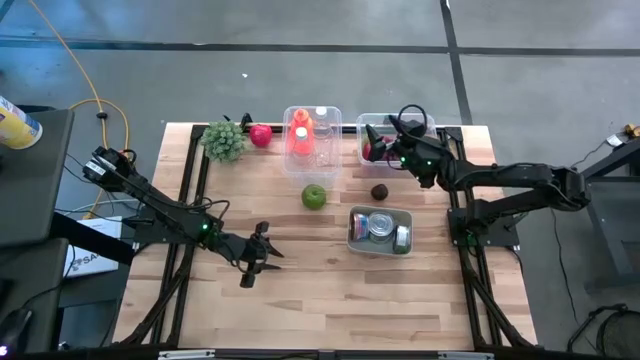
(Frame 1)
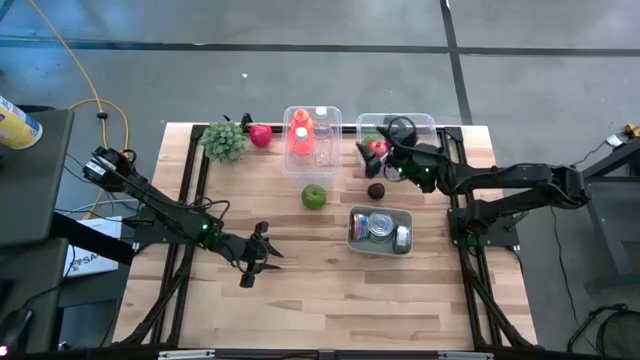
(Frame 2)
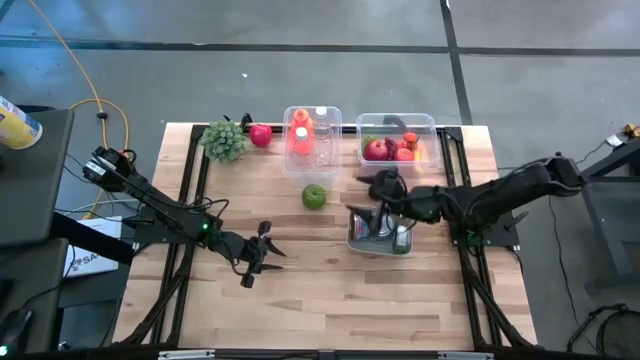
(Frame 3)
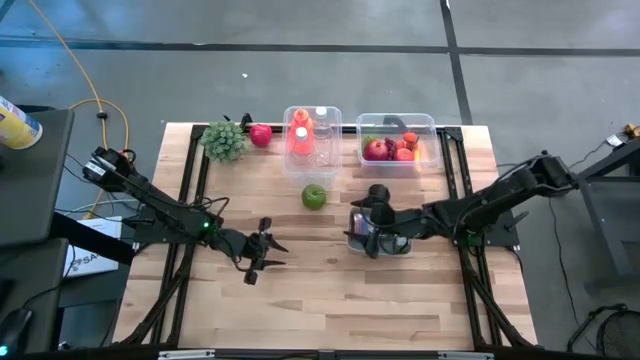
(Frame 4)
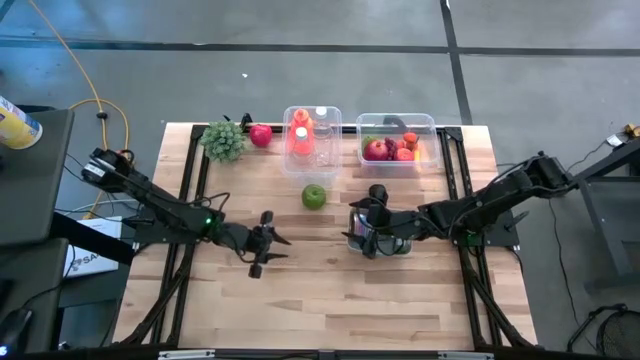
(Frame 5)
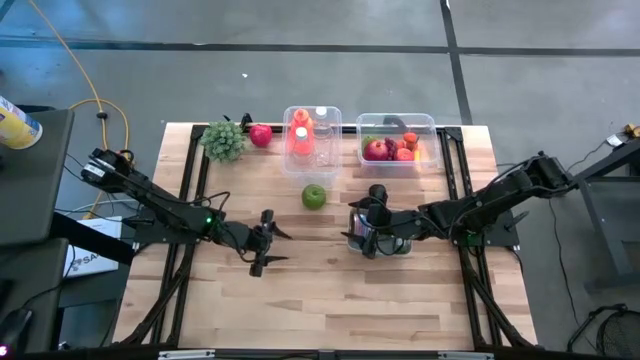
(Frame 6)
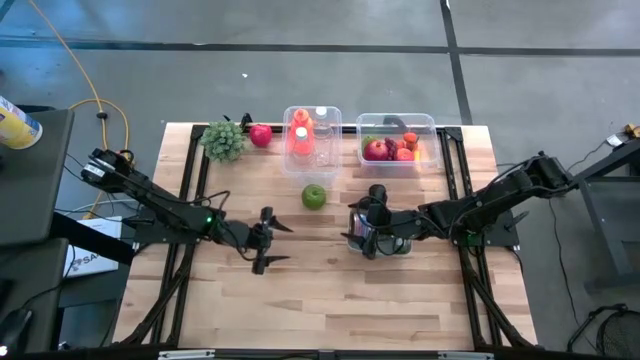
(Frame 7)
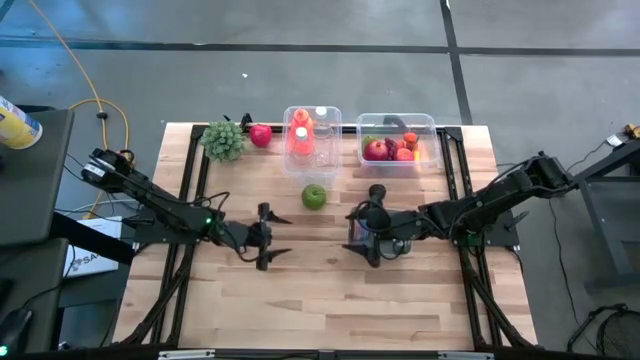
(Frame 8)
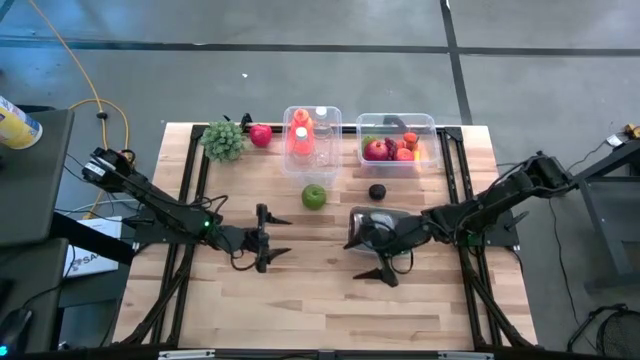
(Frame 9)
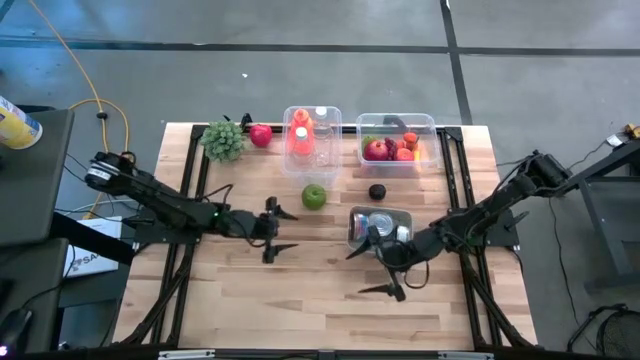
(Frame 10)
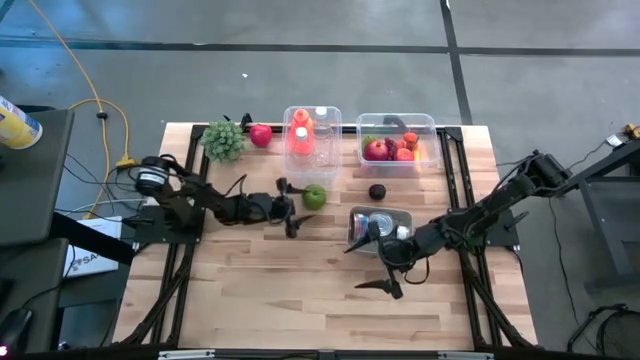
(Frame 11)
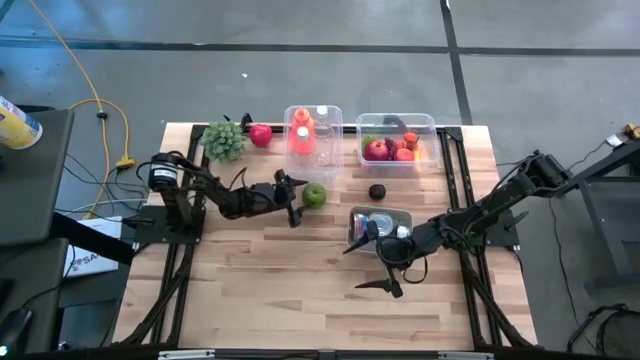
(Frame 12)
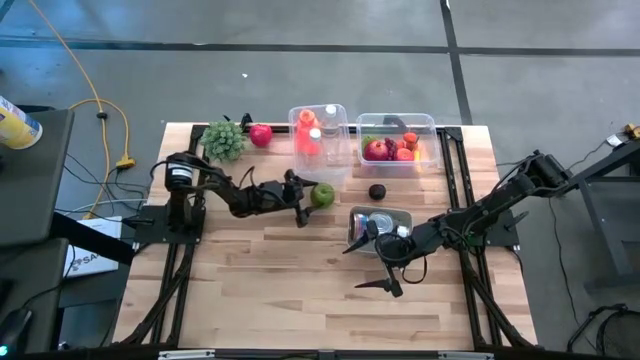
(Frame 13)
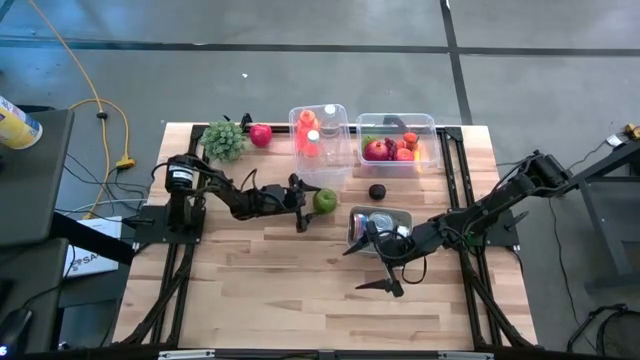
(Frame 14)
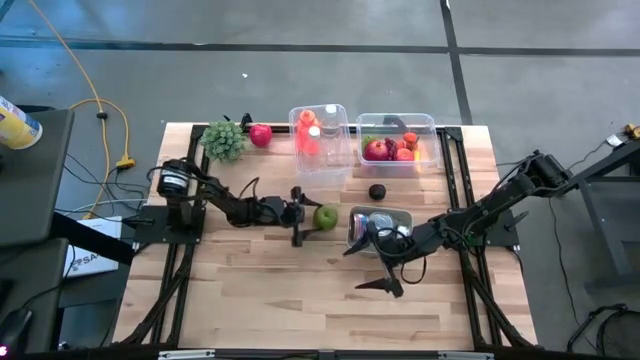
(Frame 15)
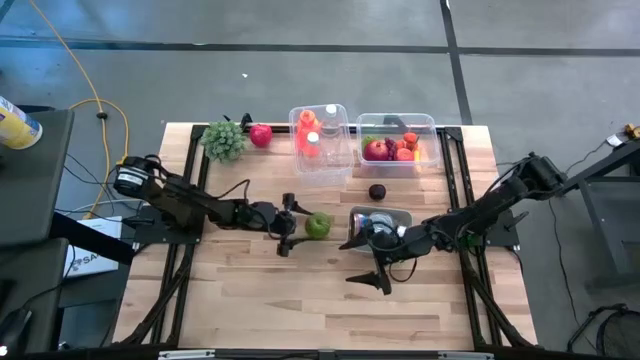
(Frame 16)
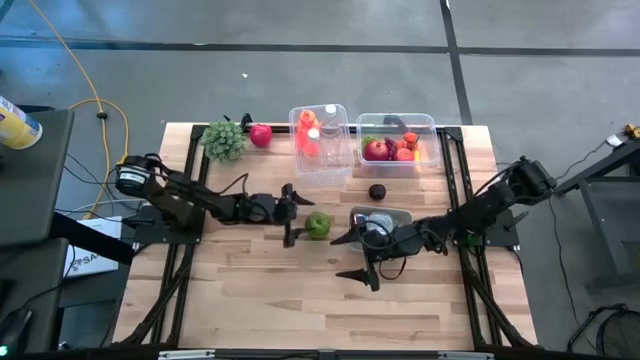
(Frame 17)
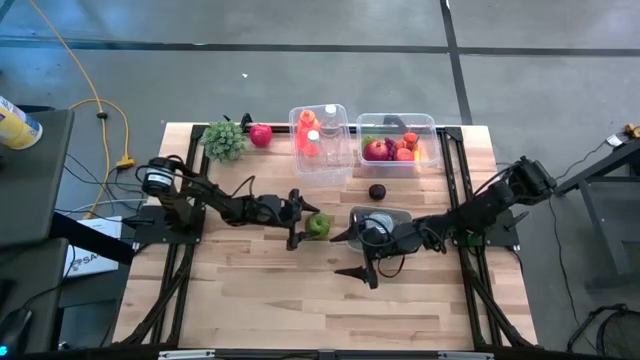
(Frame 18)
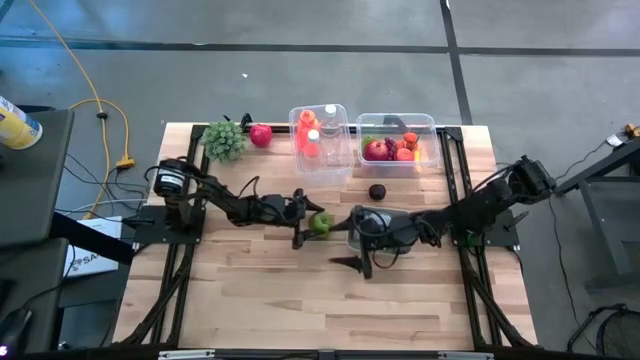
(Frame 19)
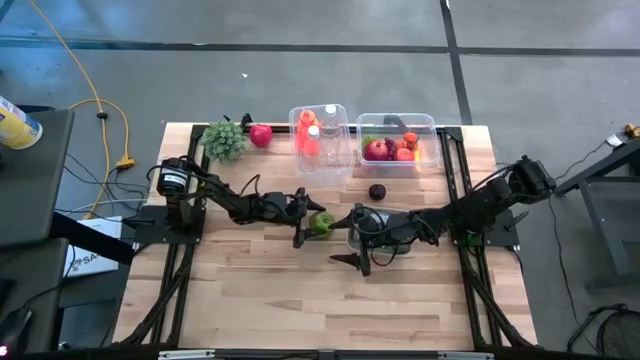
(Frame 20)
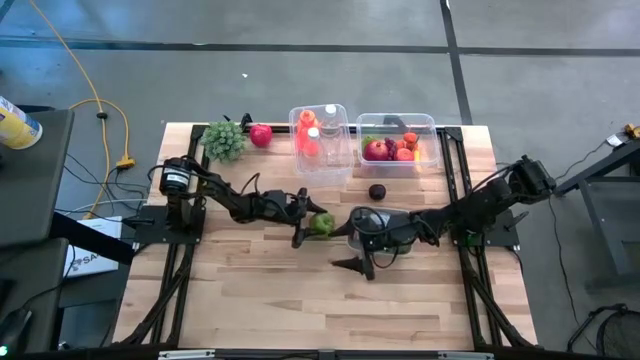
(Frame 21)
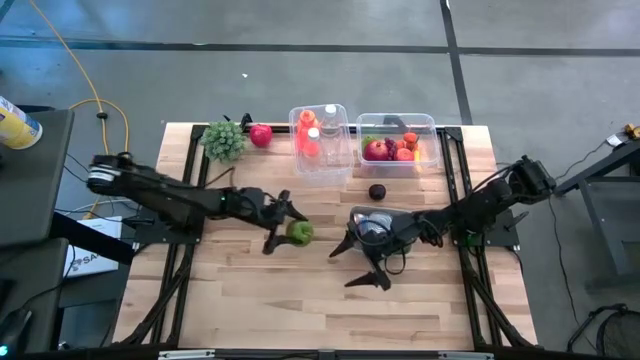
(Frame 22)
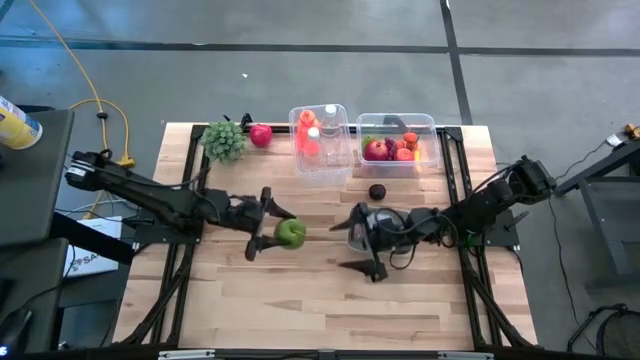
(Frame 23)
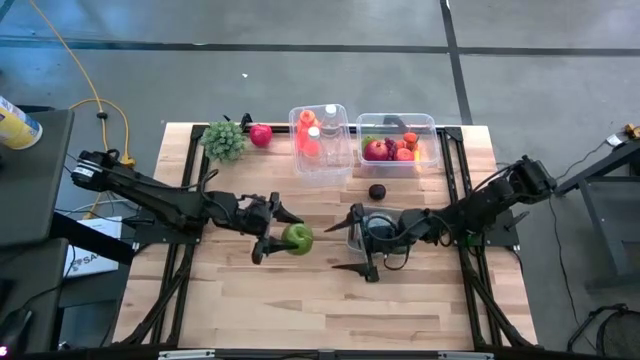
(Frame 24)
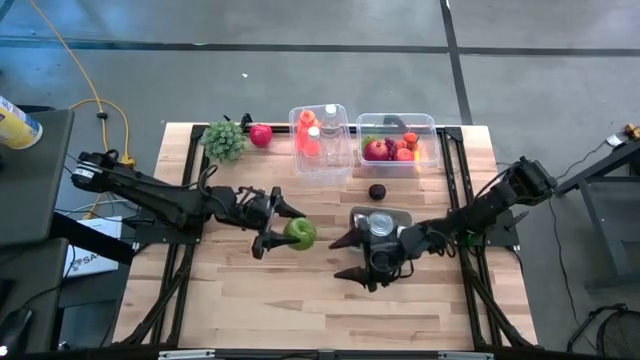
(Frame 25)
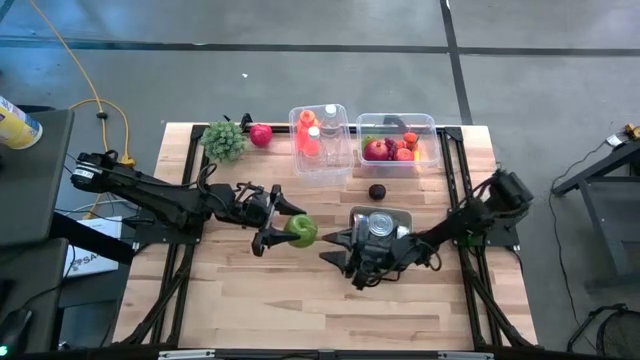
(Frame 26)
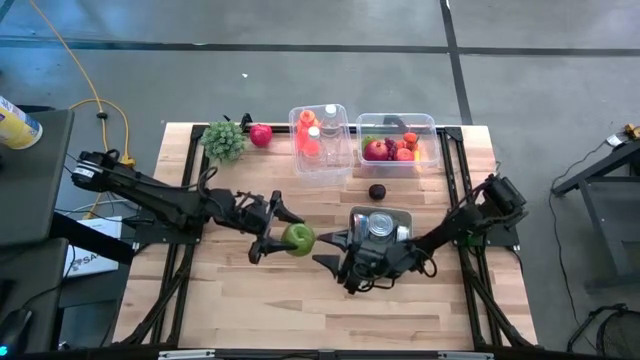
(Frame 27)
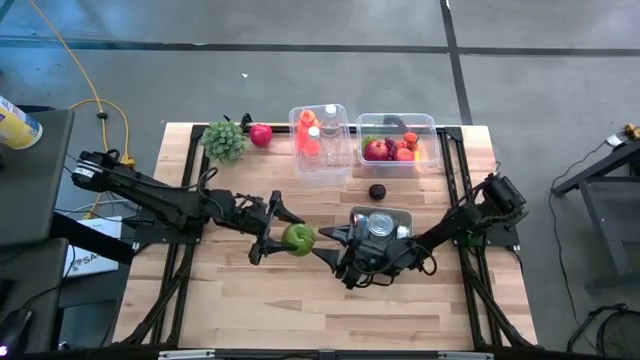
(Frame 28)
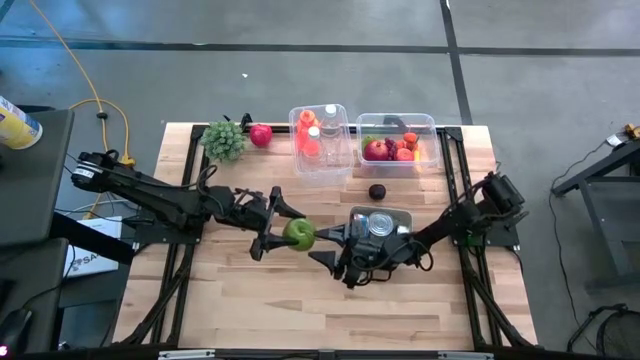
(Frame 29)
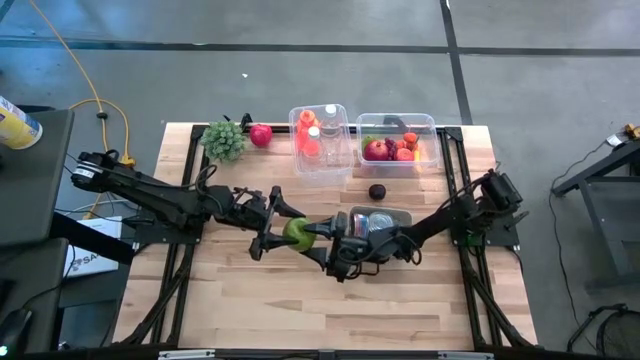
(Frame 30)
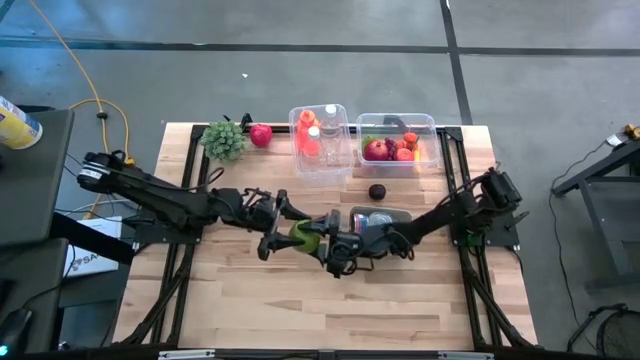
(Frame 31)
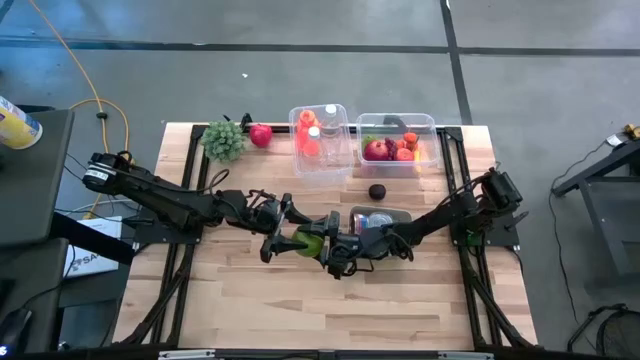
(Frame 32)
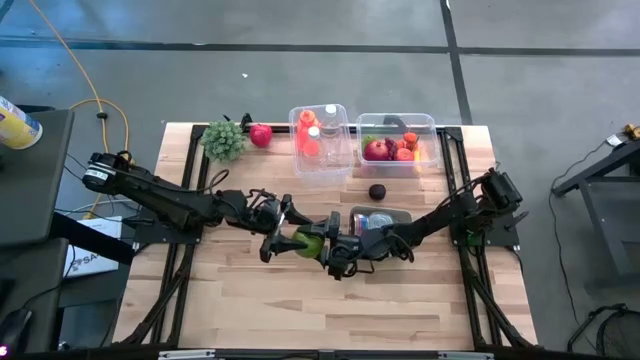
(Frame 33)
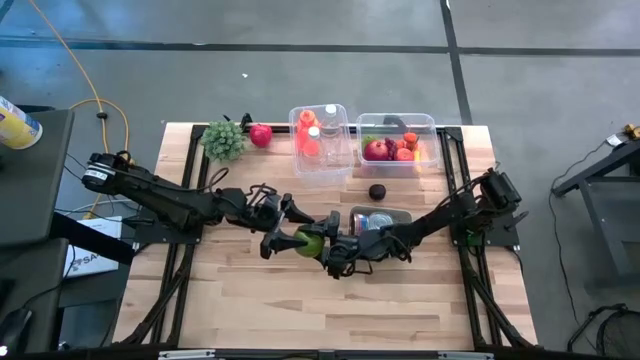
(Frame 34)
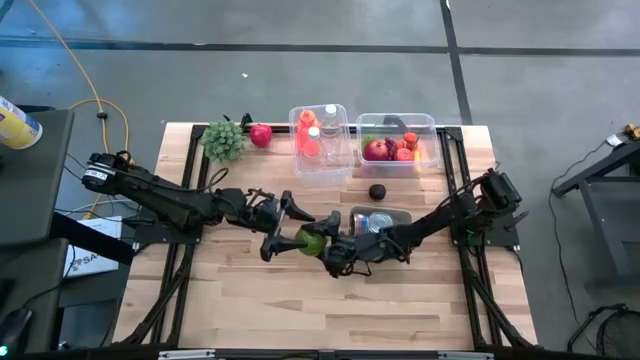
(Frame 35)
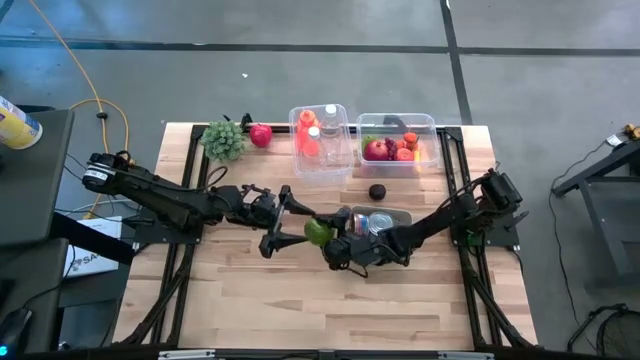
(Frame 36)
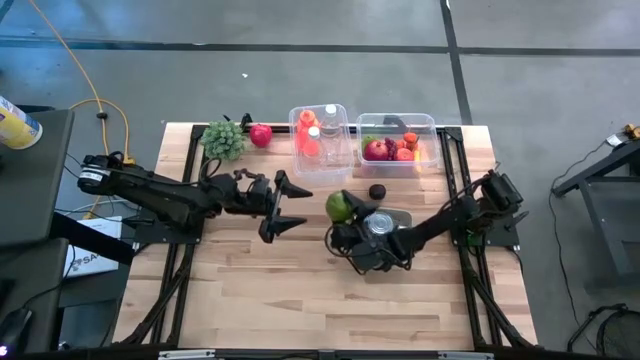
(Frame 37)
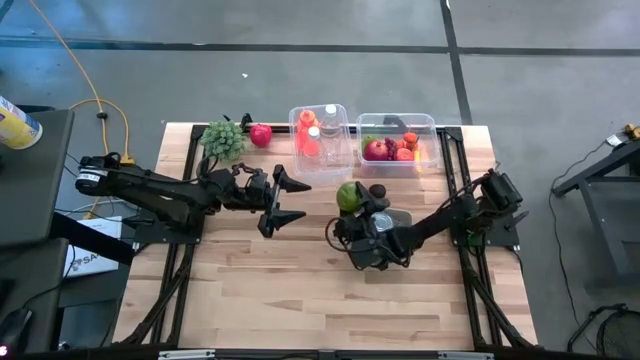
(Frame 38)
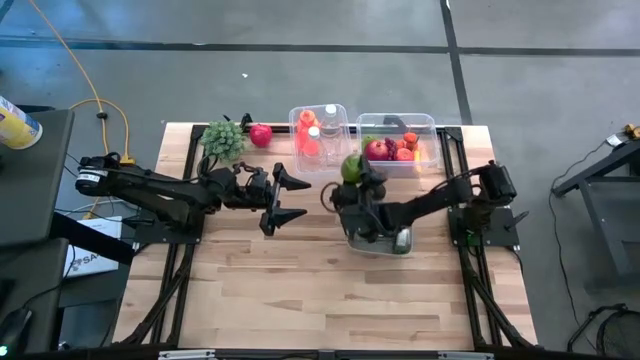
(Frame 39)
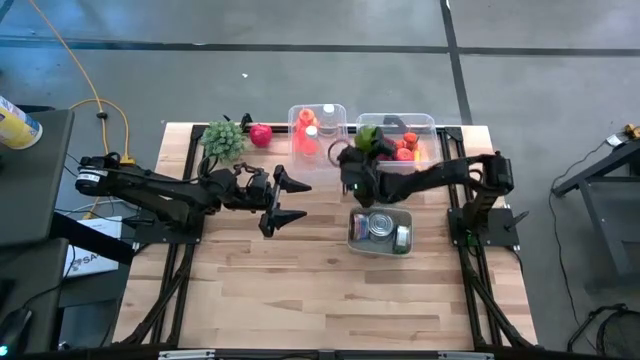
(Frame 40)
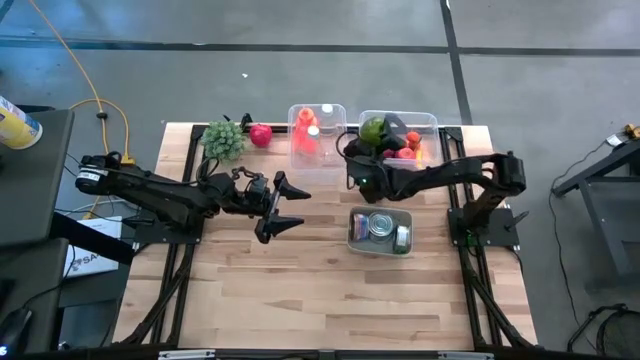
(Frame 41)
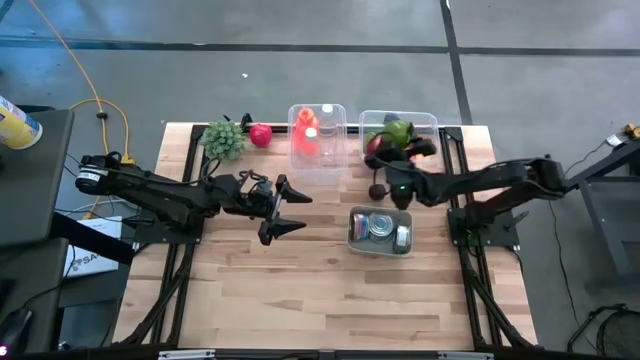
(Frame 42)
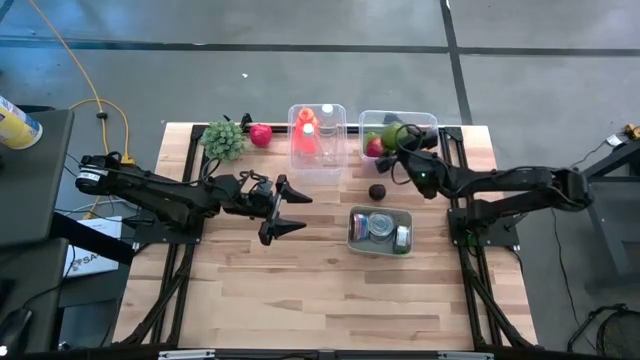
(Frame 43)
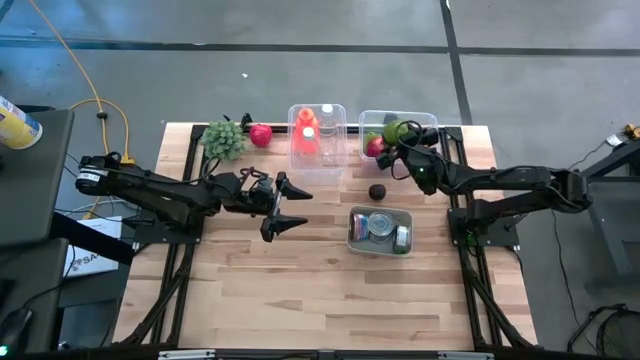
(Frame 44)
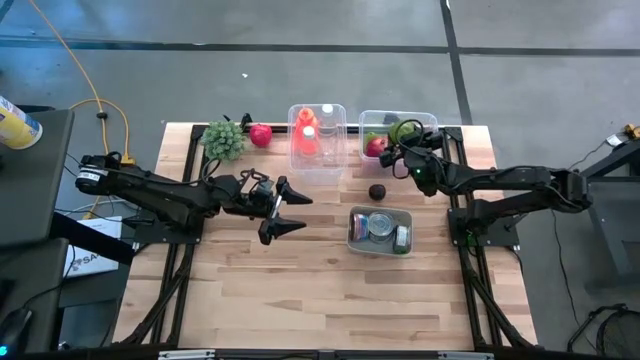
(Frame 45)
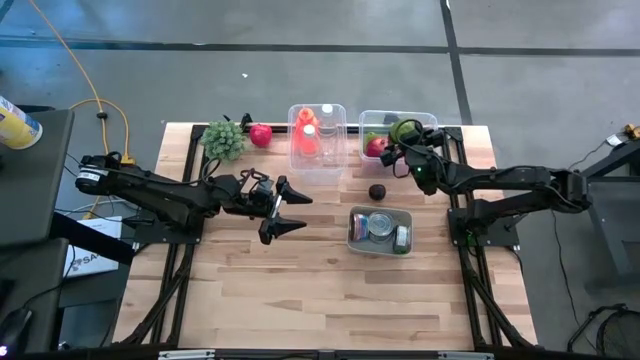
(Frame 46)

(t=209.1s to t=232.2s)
Task: Pick & Place Food Item
Put the green apple into the right transparent bin
